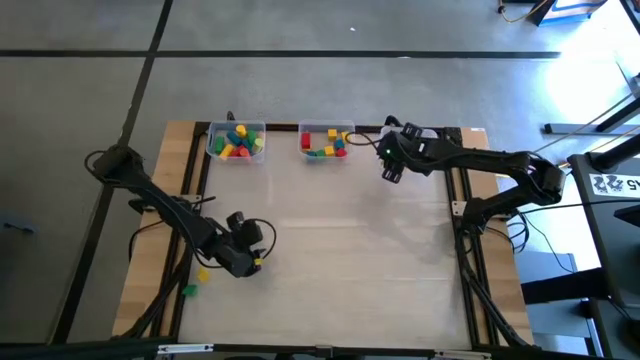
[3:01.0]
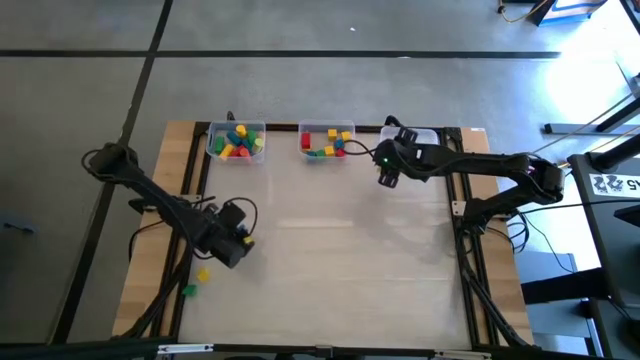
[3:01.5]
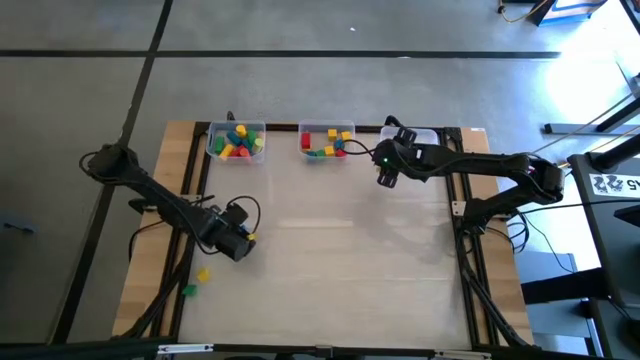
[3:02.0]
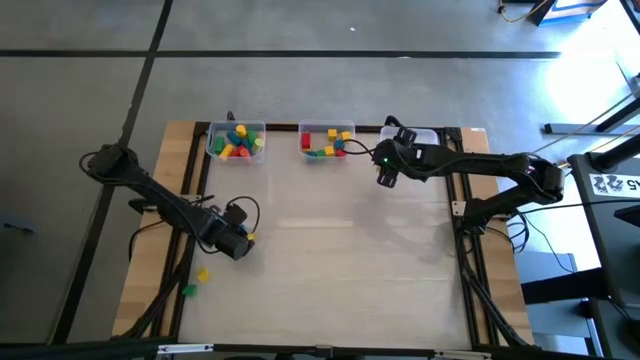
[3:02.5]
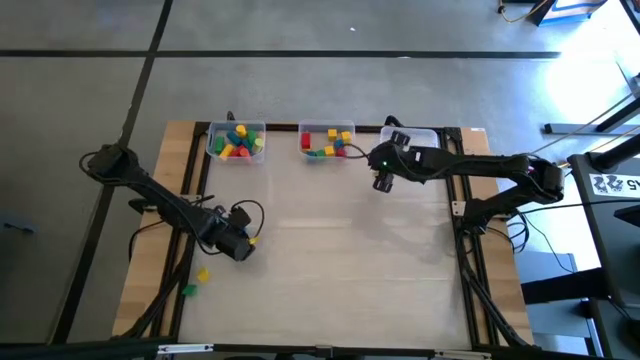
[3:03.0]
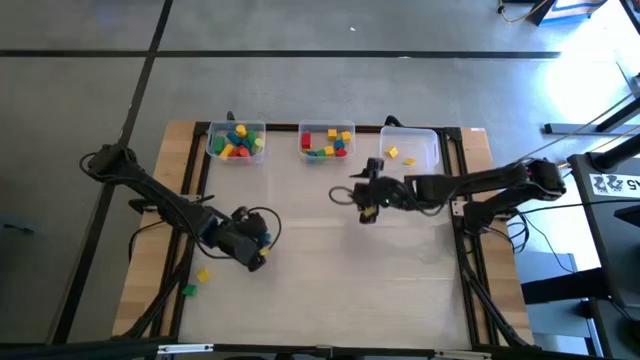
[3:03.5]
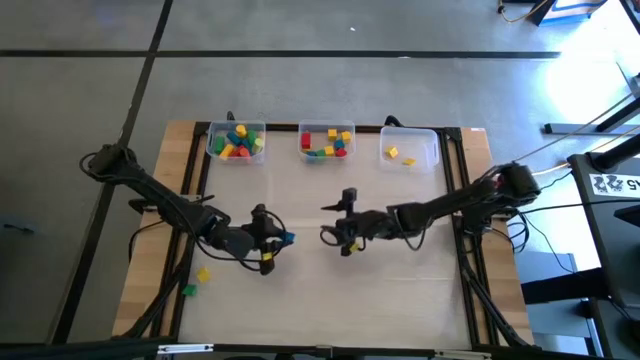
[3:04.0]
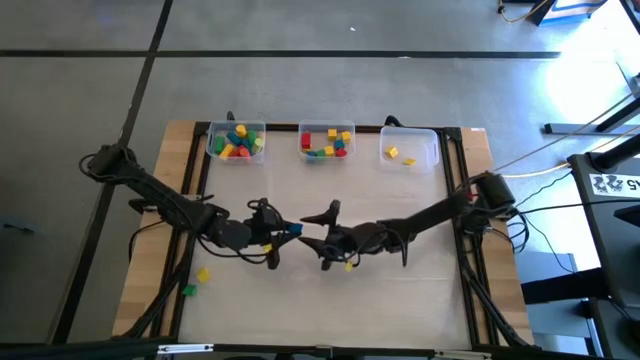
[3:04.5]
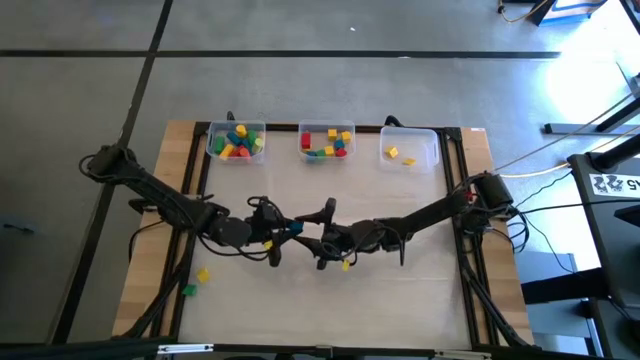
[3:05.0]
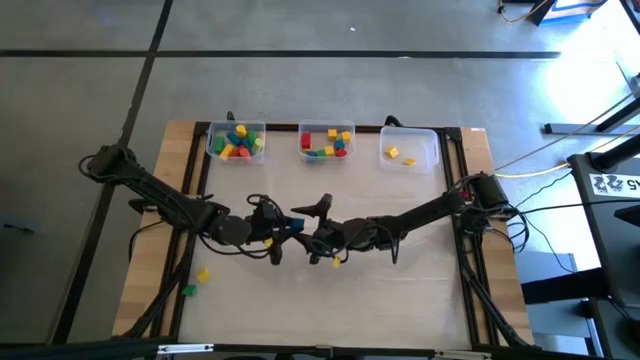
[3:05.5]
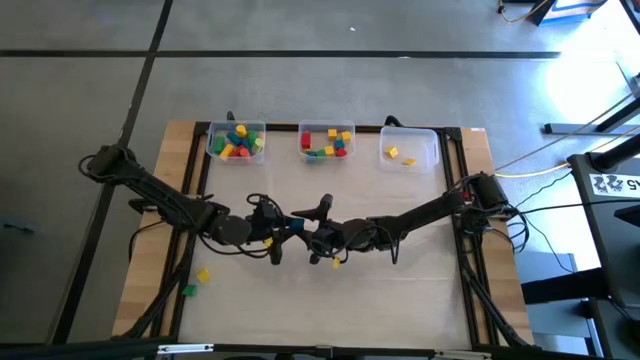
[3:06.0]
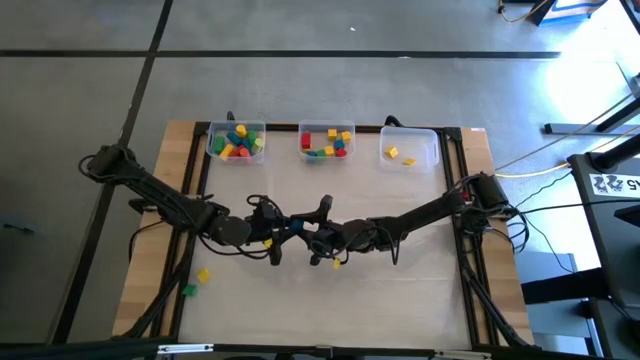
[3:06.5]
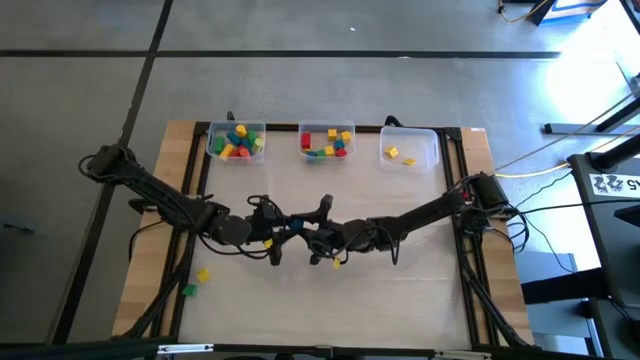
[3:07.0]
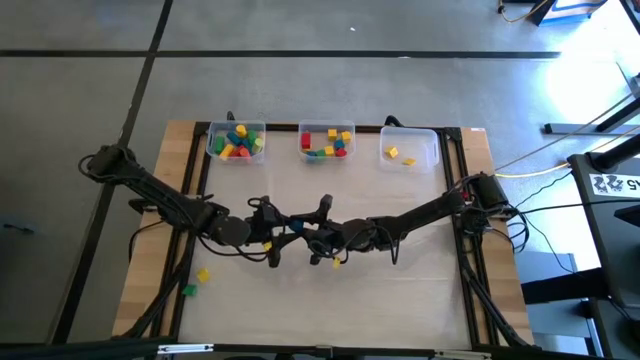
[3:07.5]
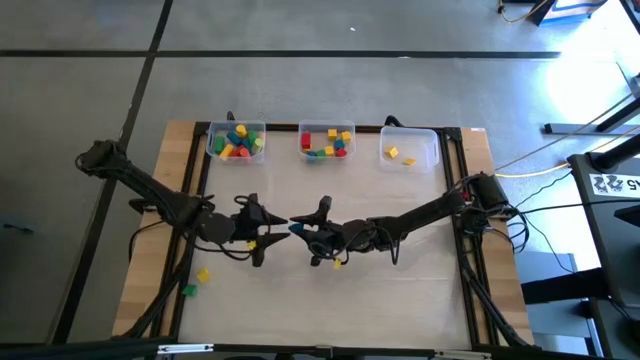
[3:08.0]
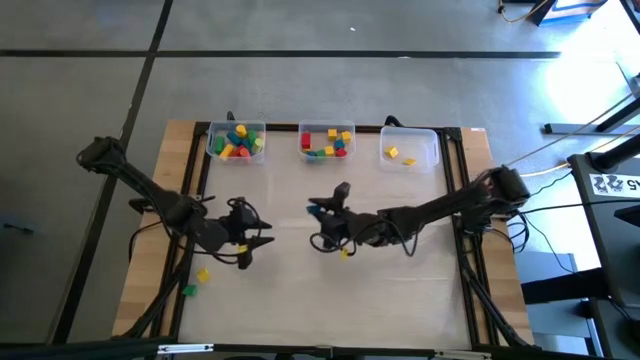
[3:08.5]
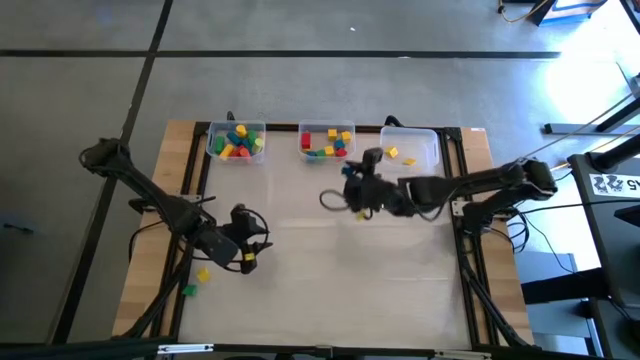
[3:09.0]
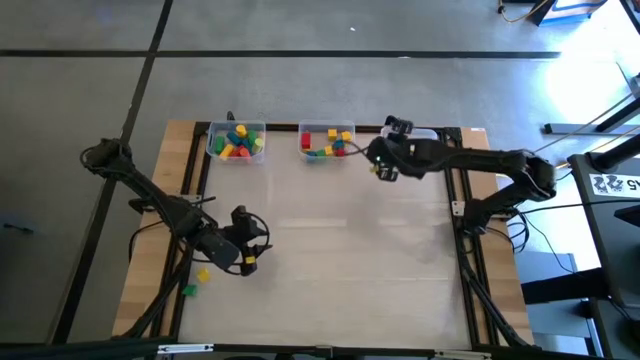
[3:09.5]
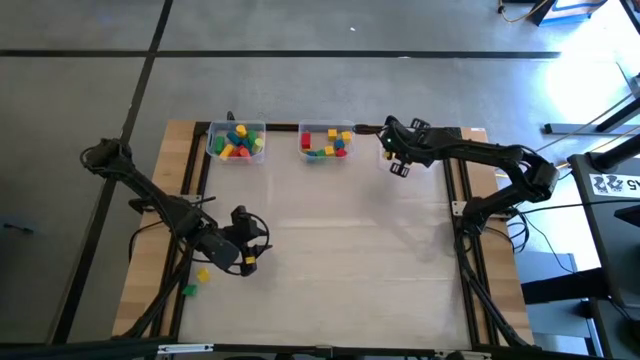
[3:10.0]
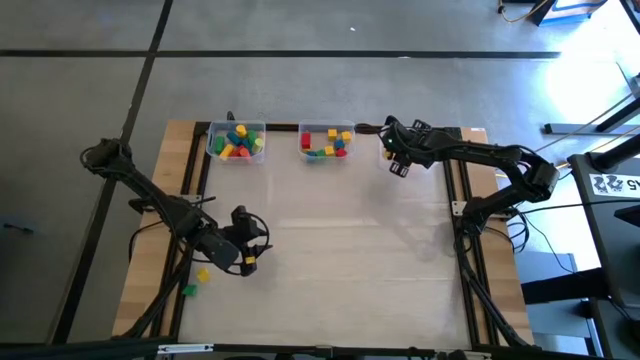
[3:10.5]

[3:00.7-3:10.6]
Task: Sort blocks by size
Put the triangular blue block into the right bin

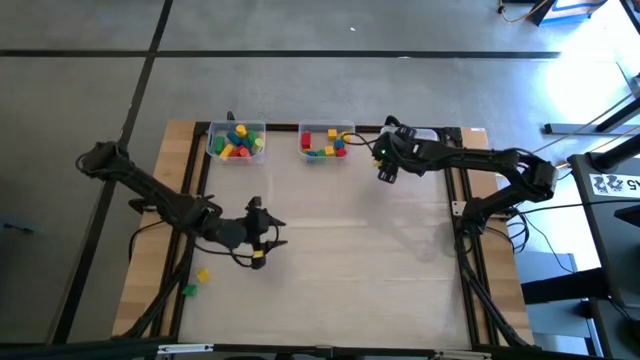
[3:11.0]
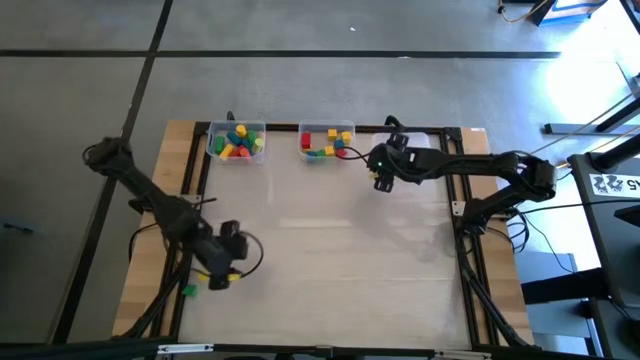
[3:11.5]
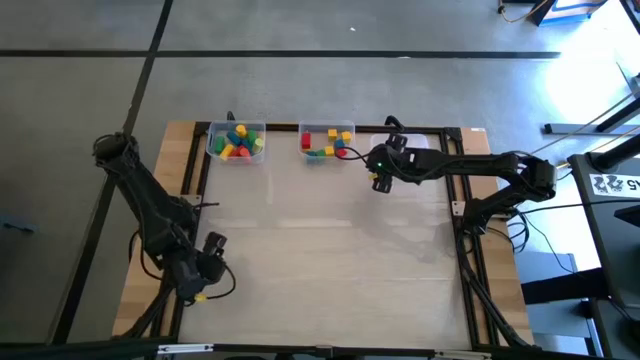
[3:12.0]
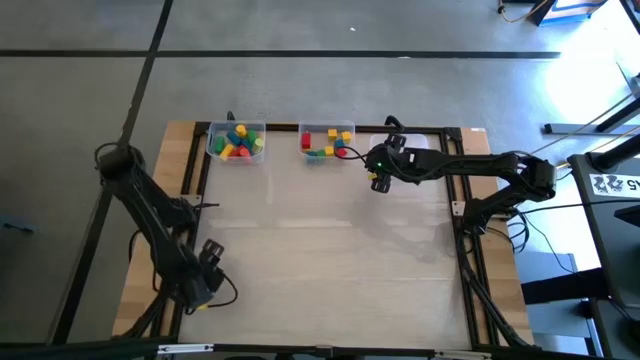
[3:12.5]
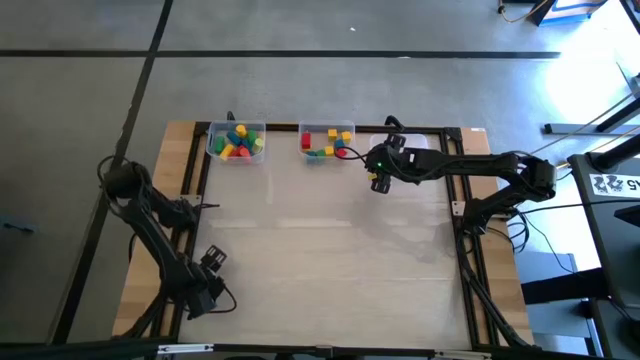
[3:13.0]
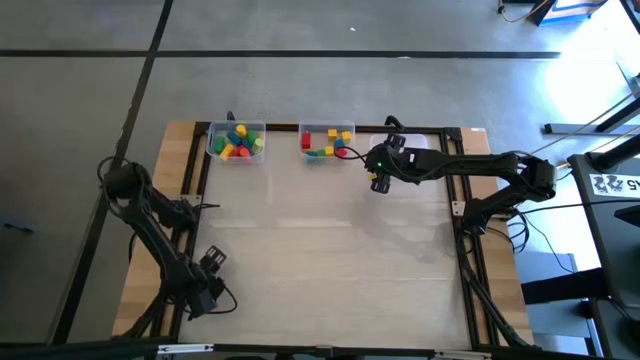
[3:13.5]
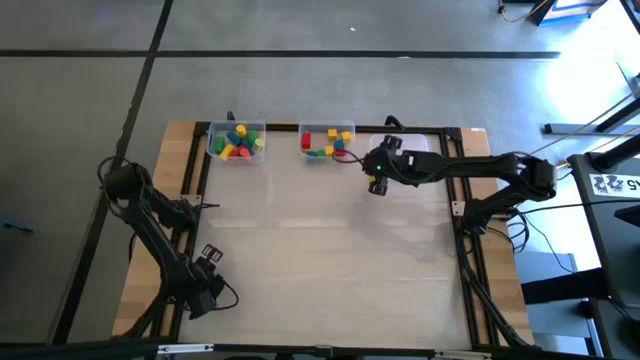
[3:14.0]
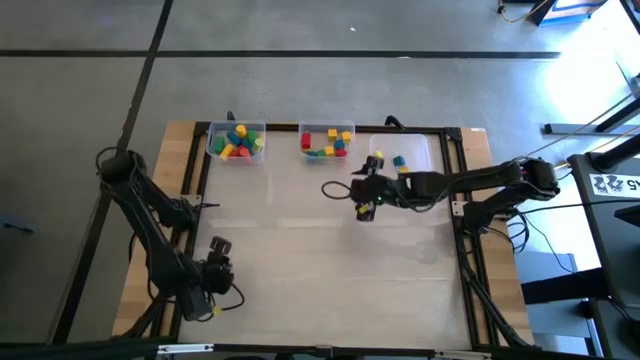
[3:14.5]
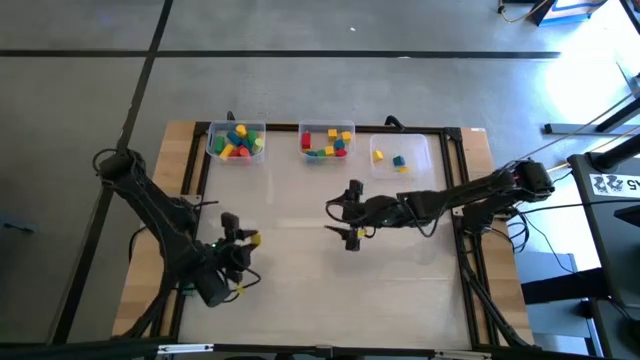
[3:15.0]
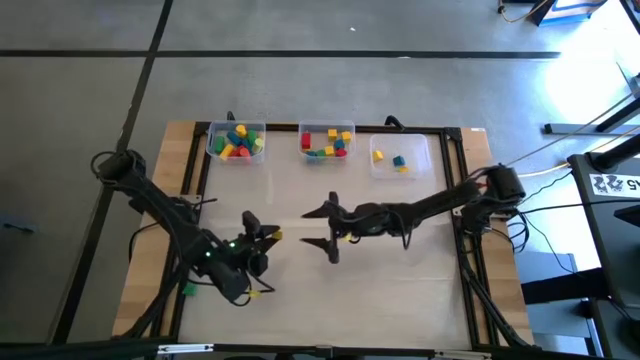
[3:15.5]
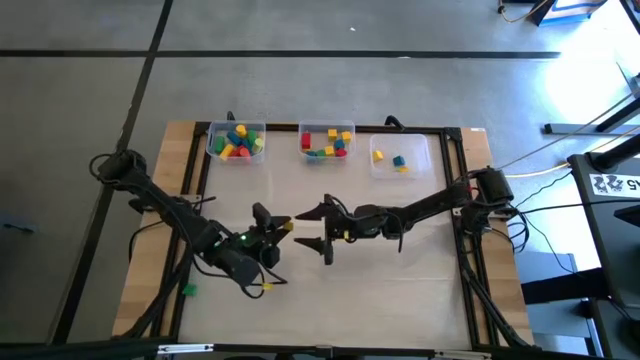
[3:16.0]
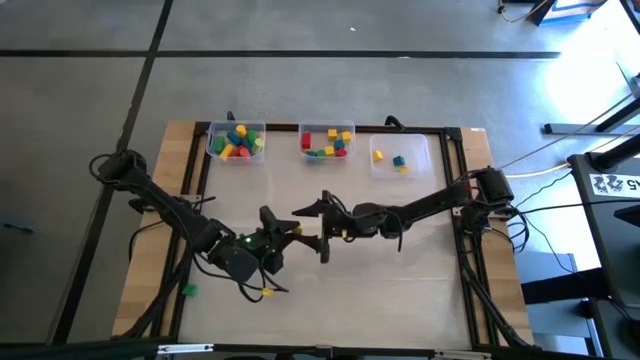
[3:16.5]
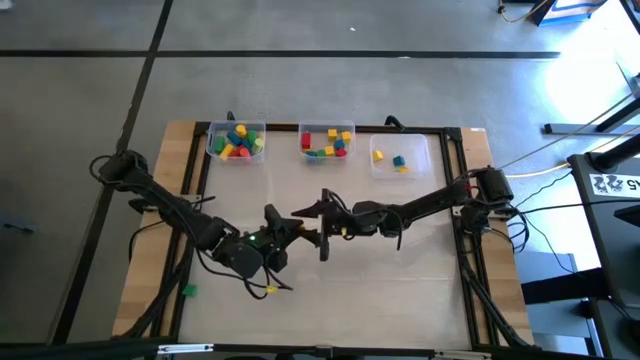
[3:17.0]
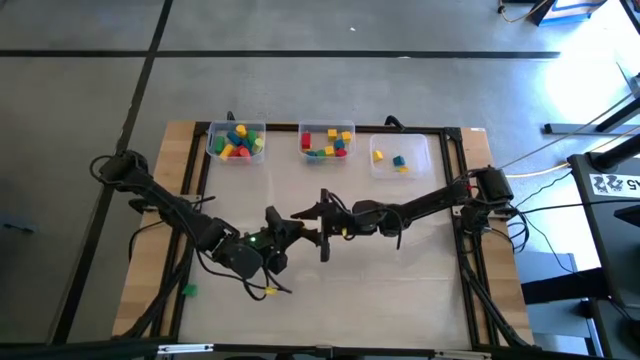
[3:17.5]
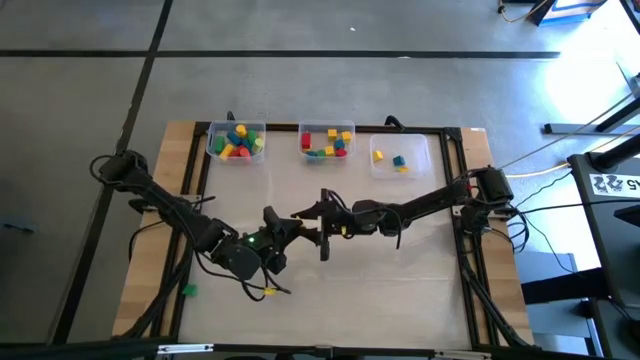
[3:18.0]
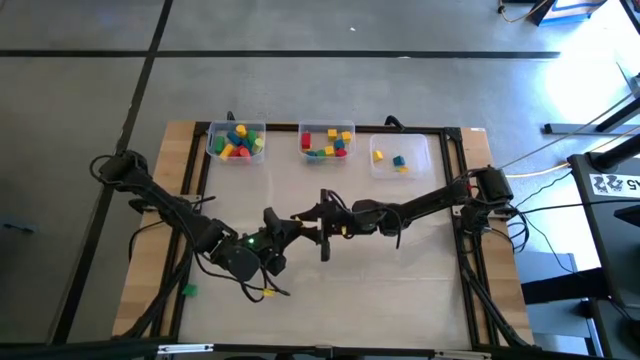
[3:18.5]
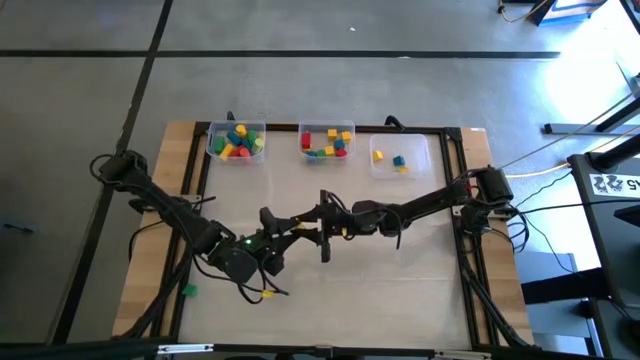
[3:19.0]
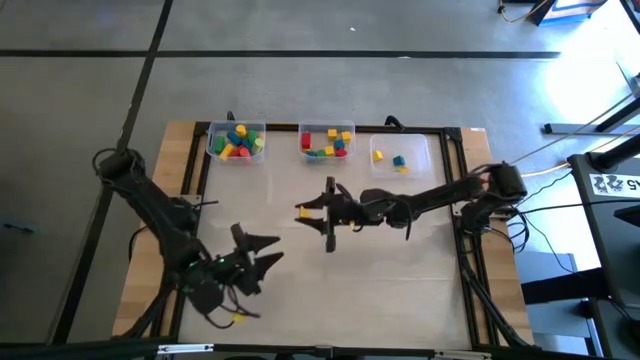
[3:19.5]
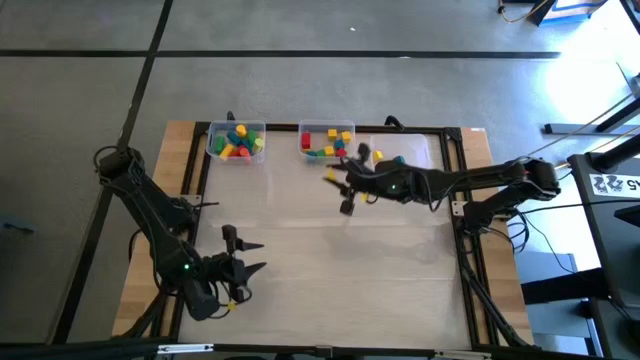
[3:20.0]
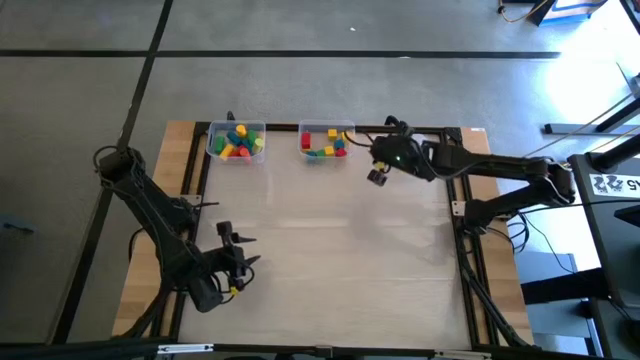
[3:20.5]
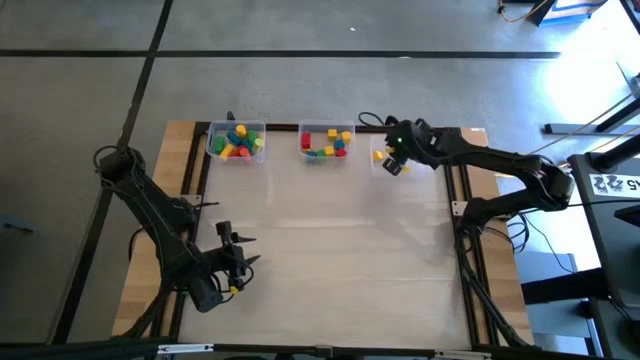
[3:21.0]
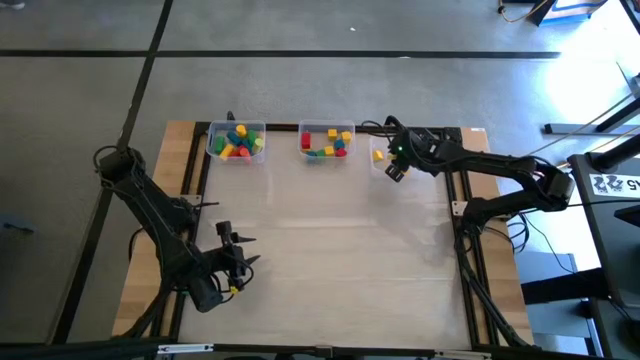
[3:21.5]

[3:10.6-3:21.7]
Put the triangular yellow block into the right bin
